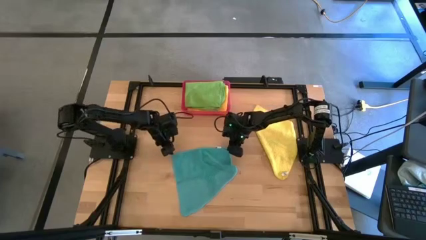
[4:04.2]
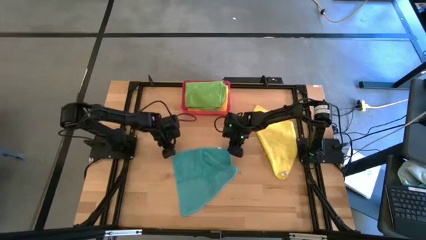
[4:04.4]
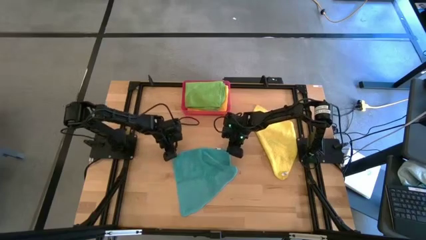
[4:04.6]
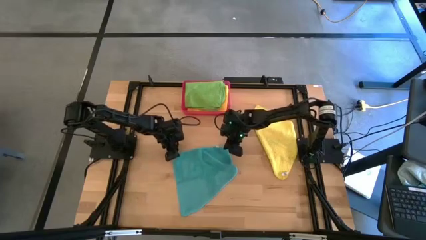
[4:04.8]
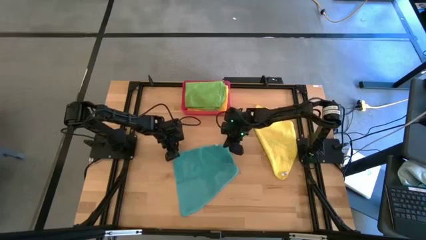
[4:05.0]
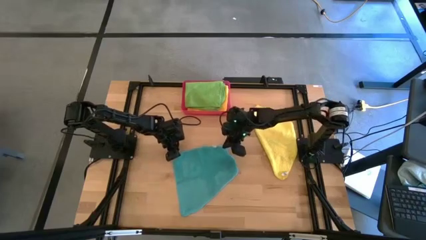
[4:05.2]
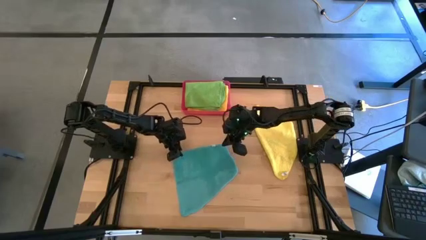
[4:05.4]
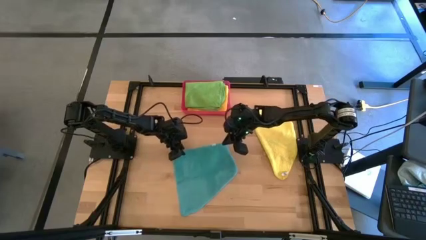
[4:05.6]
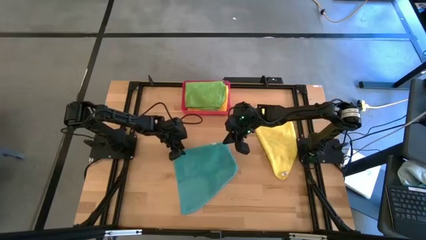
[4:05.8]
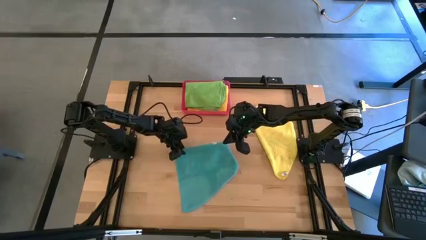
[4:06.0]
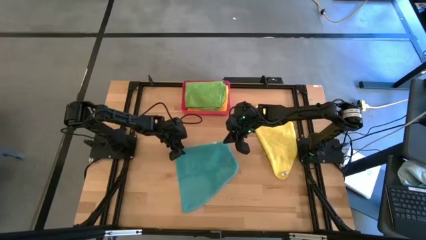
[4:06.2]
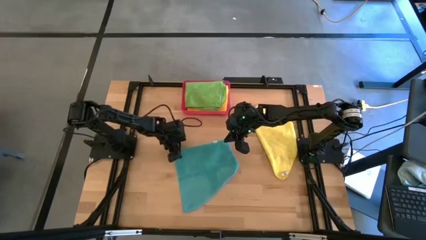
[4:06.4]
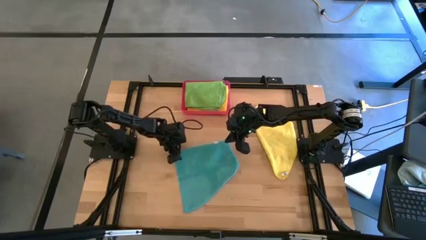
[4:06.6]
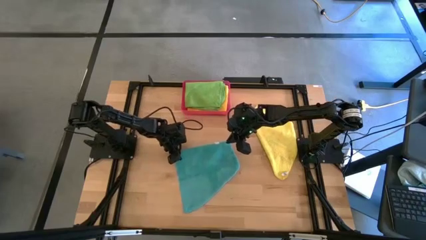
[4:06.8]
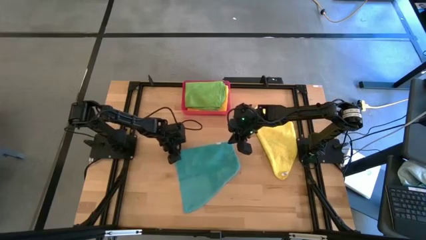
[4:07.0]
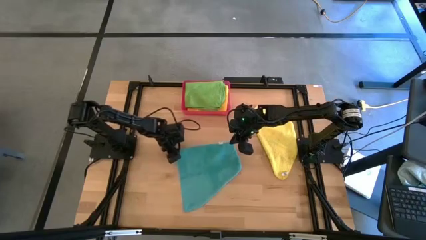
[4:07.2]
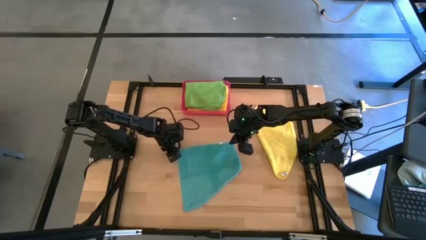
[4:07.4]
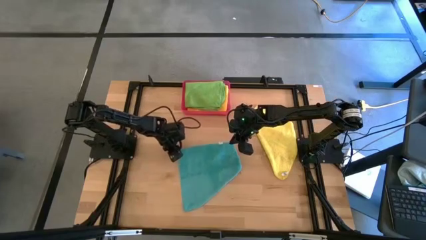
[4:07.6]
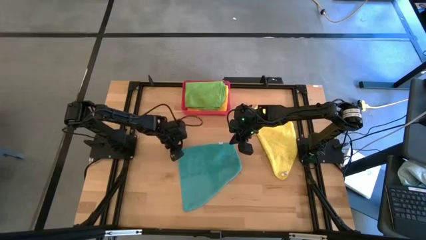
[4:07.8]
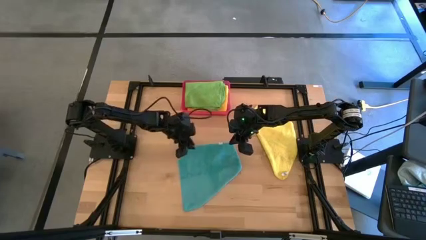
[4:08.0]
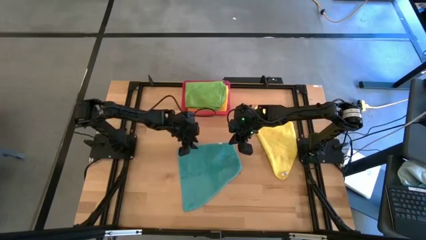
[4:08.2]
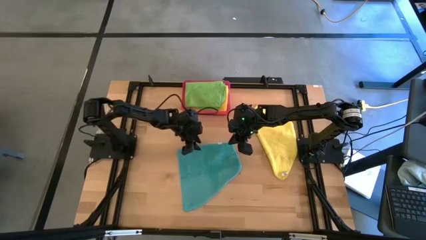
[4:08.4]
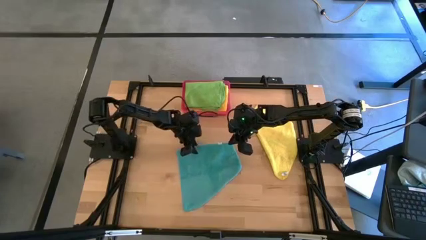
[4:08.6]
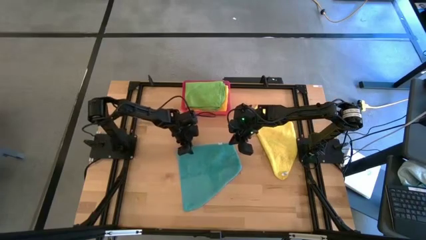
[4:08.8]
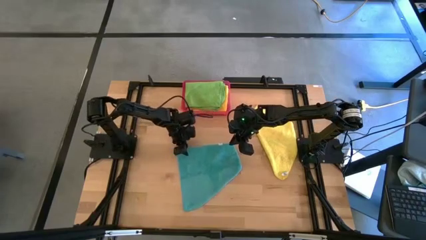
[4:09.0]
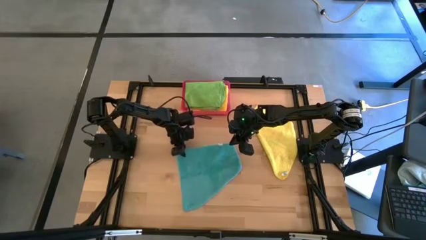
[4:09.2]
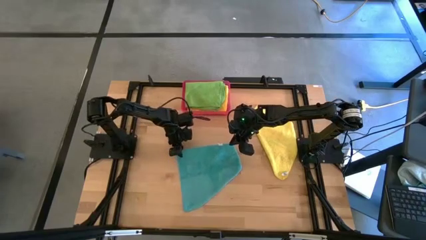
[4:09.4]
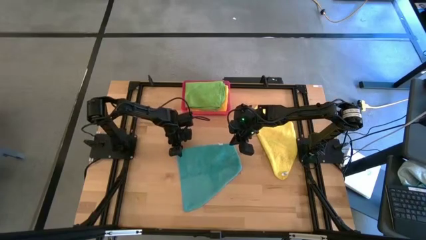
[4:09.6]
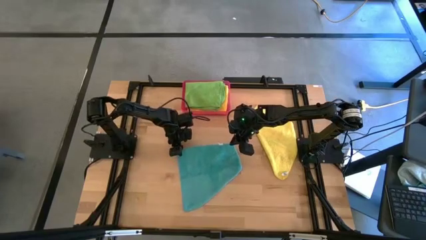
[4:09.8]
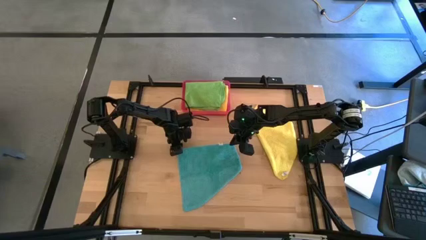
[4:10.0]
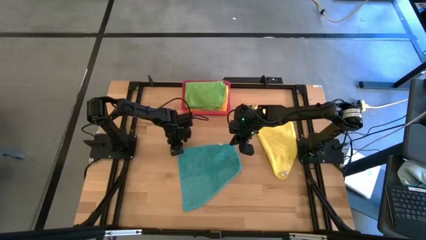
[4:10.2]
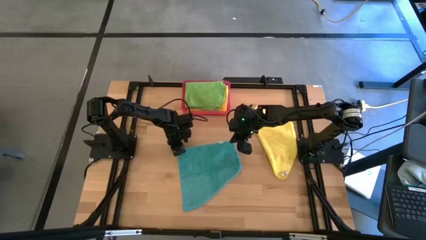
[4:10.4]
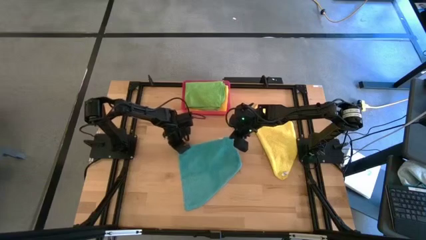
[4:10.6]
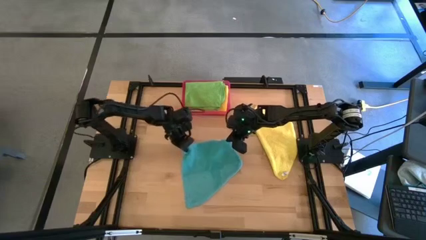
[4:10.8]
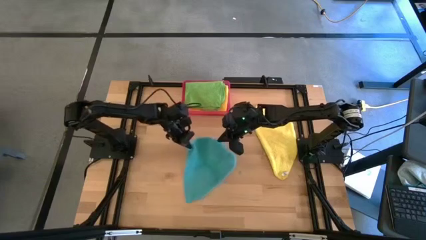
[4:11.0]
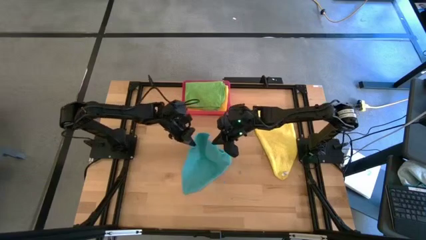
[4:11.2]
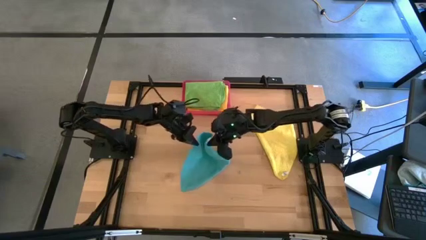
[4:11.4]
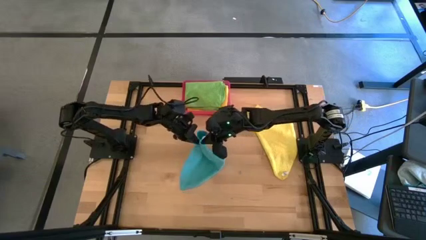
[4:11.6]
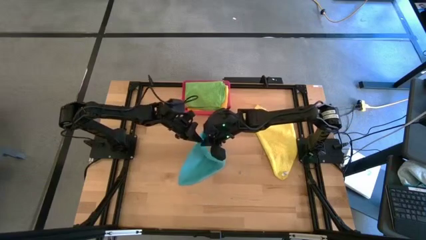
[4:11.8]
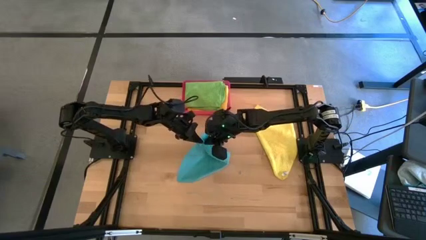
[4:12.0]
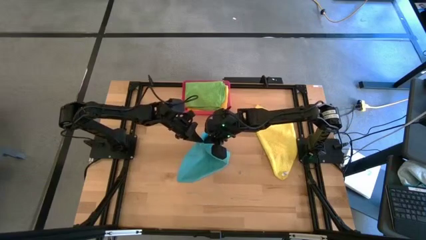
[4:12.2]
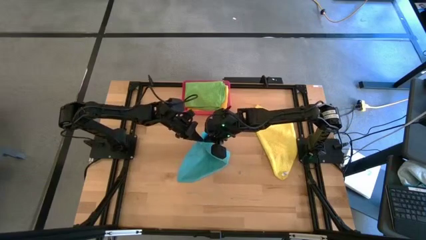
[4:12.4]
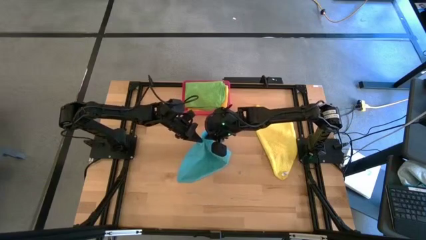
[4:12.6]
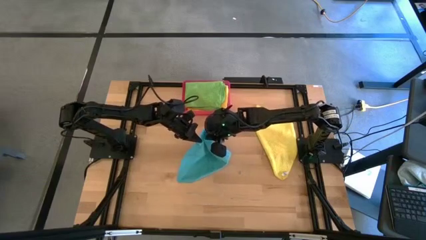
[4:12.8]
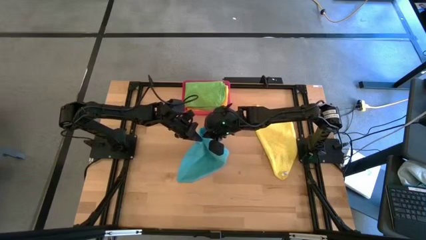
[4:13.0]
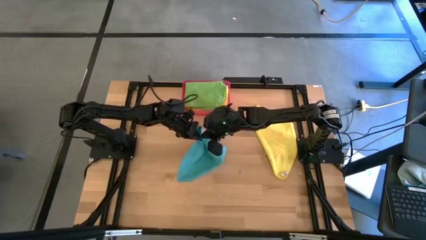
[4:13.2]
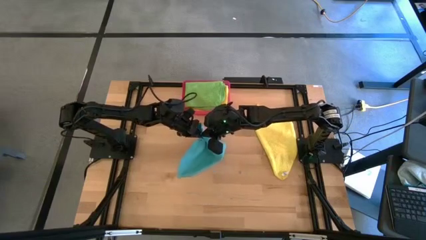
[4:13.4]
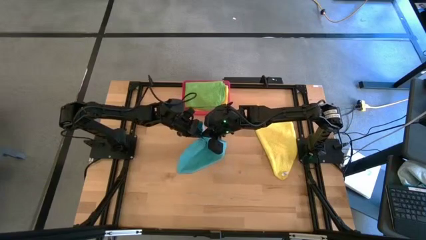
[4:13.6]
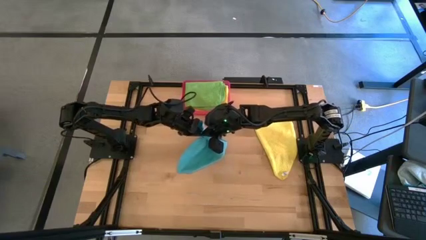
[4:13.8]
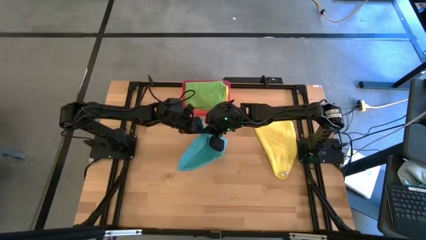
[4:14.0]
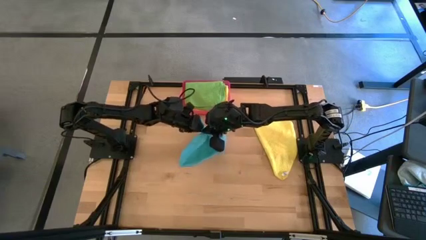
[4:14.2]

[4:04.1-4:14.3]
Task: Fold microfiber towels
Fold the blue microfiber cloth

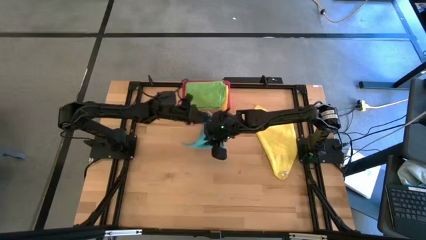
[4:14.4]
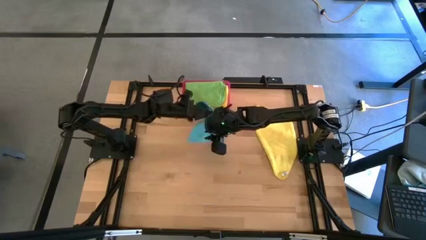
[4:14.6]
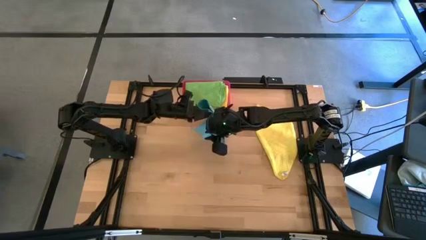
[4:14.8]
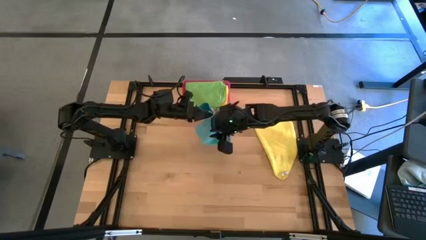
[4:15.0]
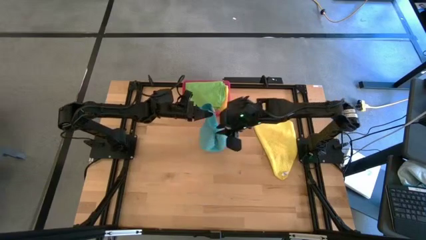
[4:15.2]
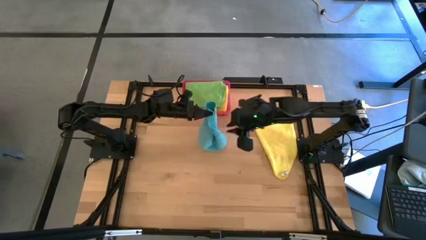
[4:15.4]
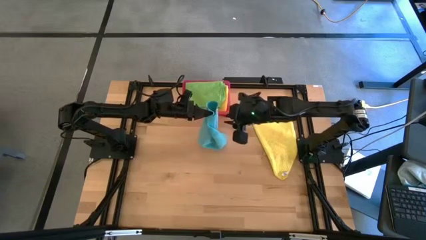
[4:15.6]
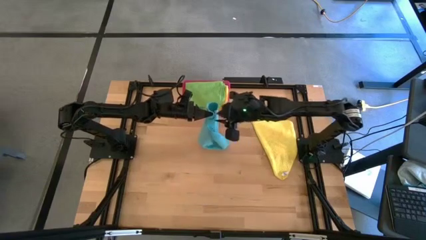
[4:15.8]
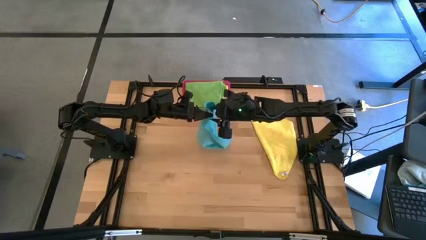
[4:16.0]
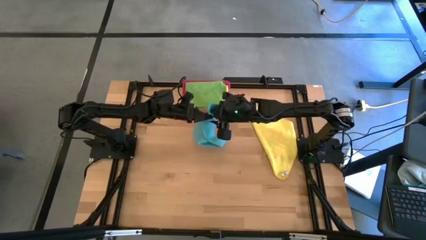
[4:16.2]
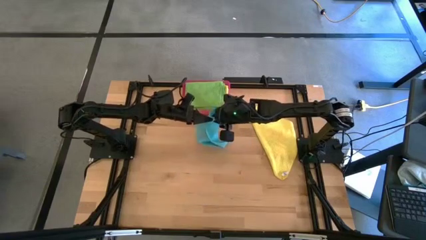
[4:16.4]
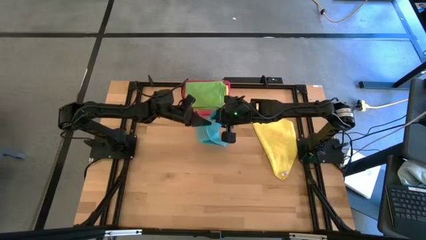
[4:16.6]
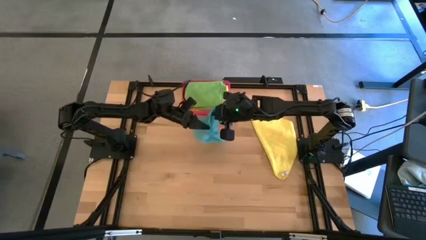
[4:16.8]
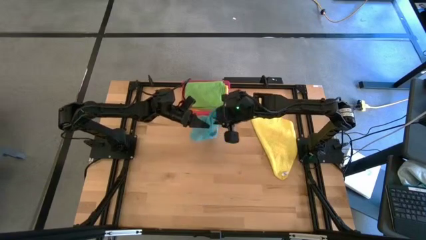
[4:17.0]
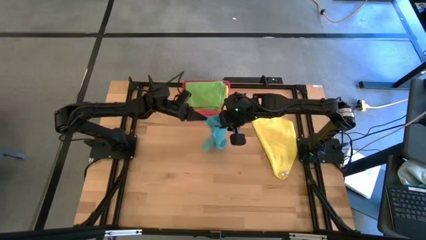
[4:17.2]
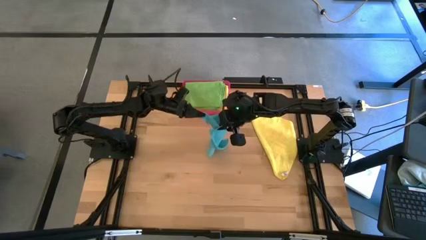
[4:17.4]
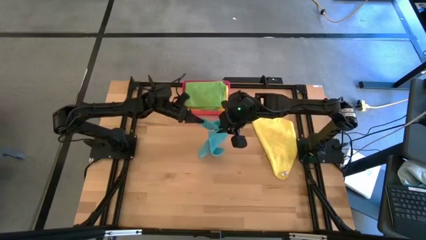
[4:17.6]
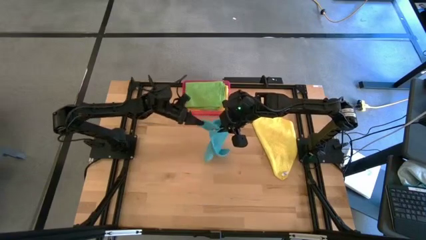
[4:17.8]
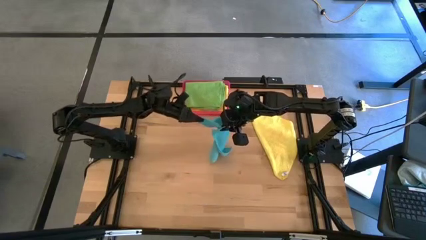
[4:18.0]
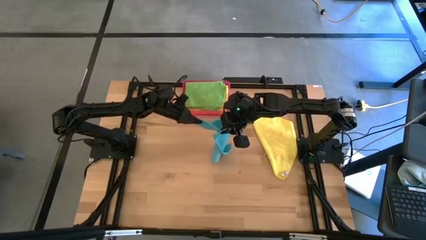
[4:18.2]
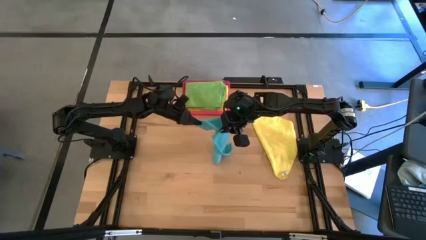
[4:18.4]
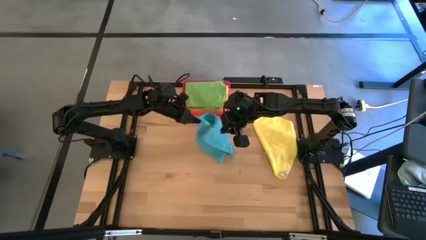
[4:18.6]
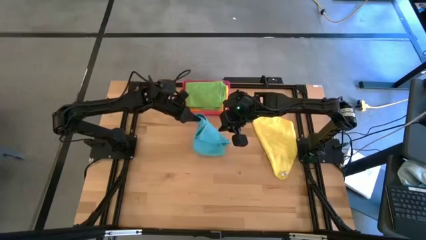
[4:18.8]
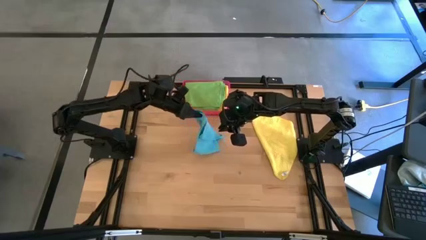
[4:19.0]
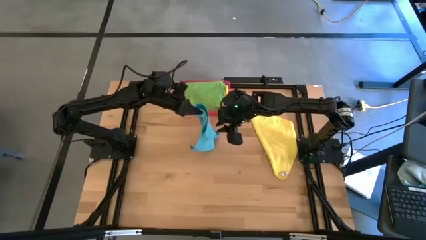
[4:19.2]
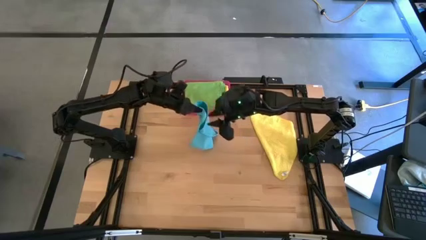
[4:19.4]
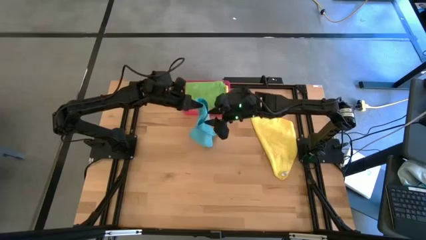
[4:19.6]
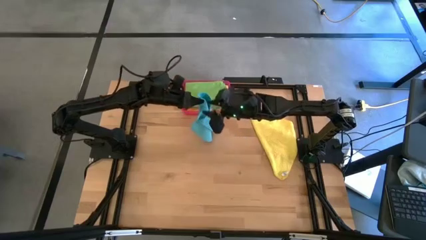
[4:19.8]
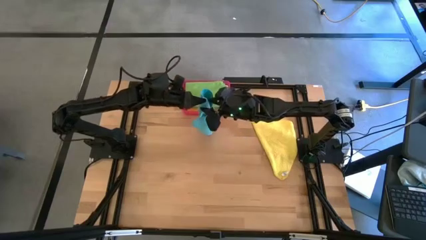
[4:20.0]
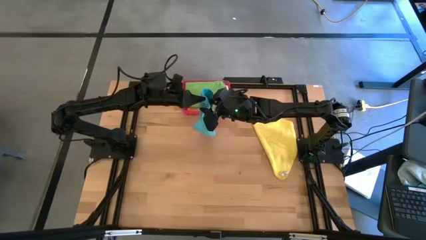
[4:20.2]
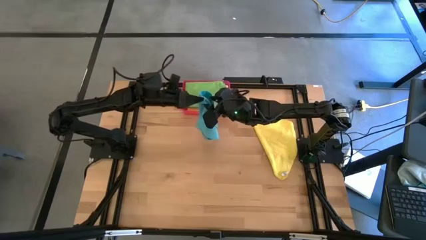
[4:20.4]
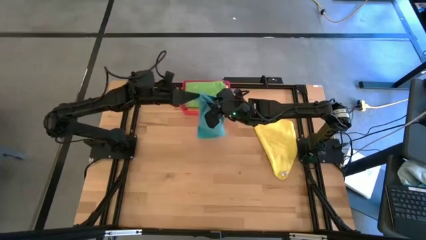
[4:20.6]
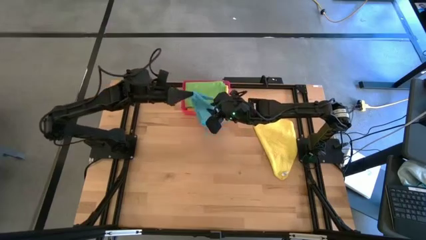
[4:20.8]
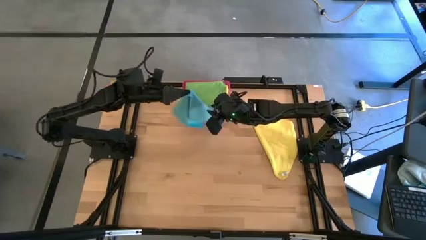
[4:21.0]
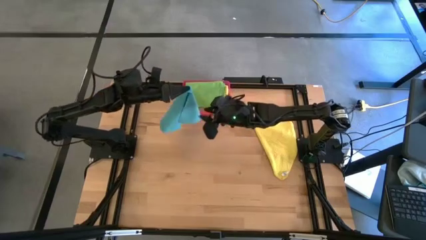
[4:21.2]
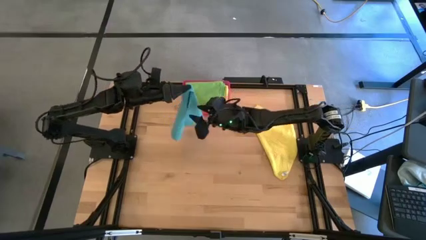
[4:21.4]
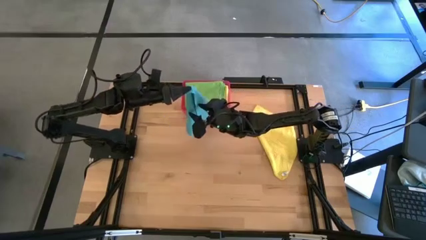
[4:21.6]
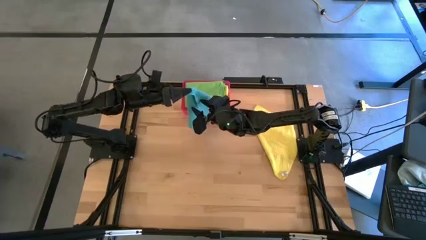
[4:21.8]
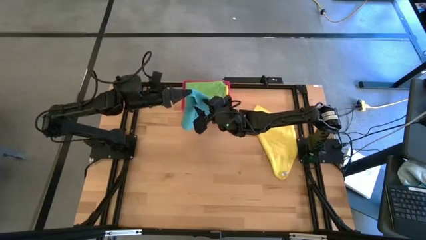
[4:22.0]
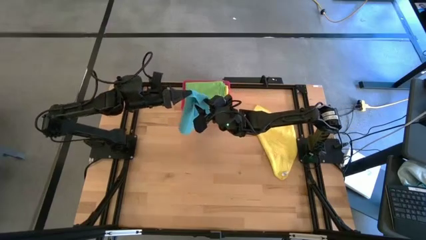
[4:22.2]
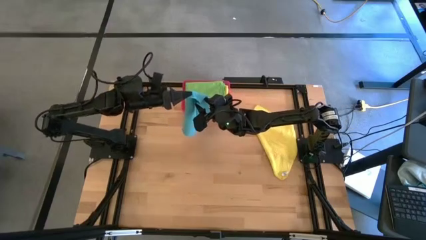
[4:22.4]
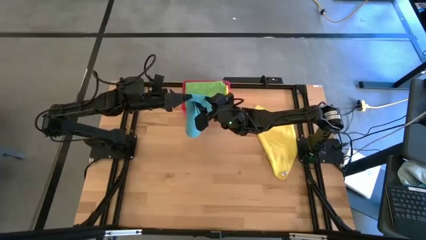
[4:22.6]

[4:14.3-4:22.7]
Fold the blue microfiber cloth
